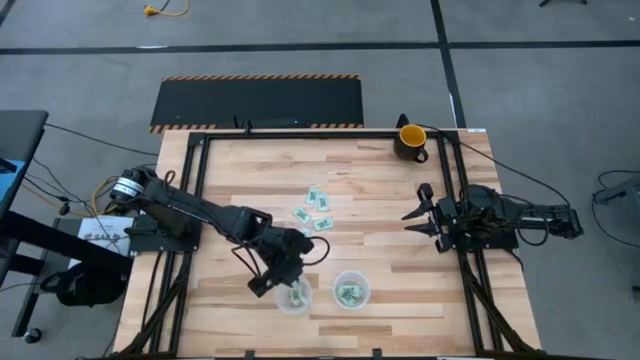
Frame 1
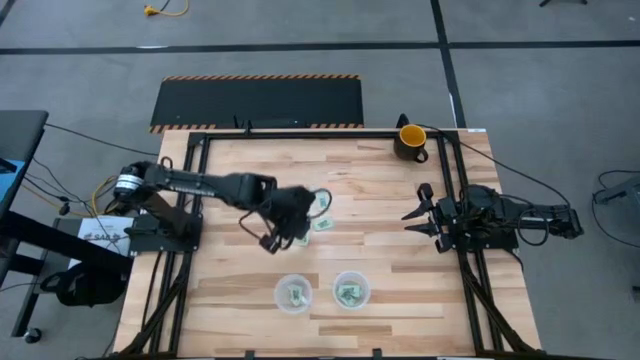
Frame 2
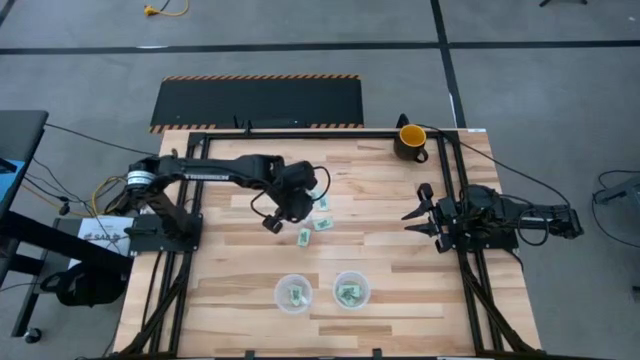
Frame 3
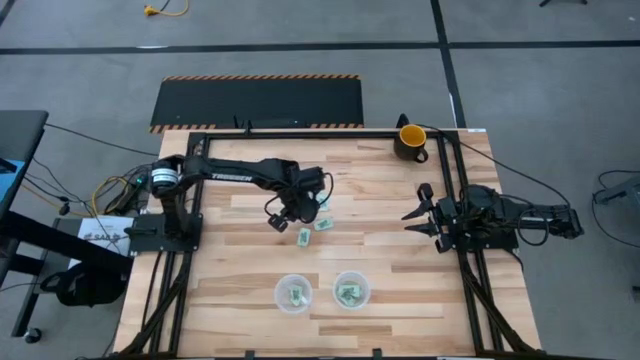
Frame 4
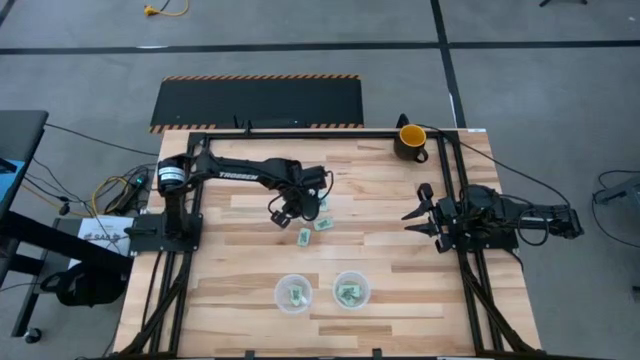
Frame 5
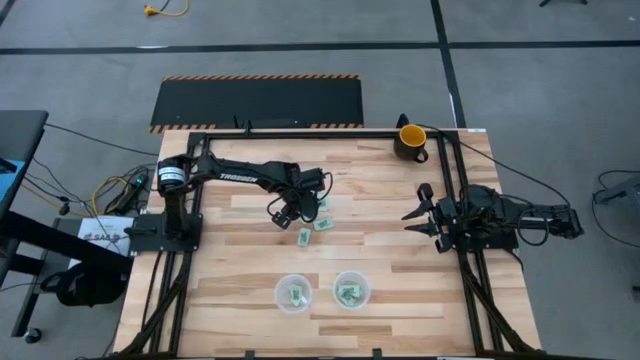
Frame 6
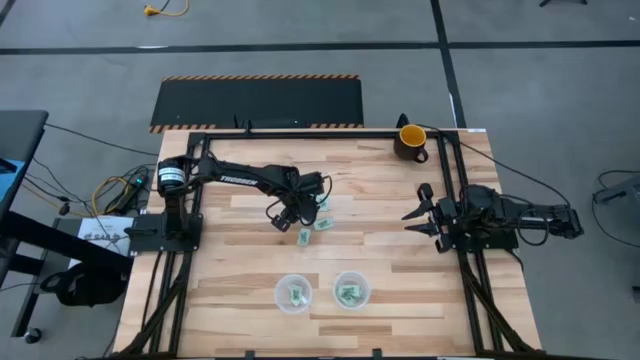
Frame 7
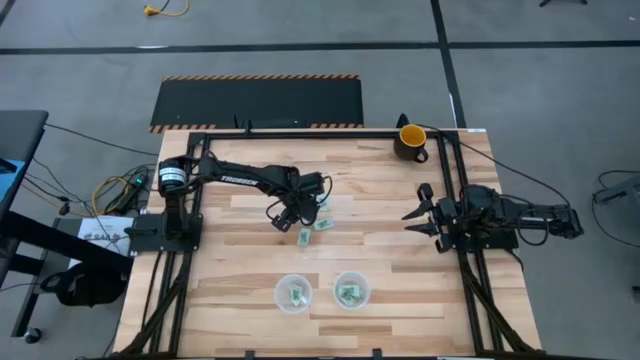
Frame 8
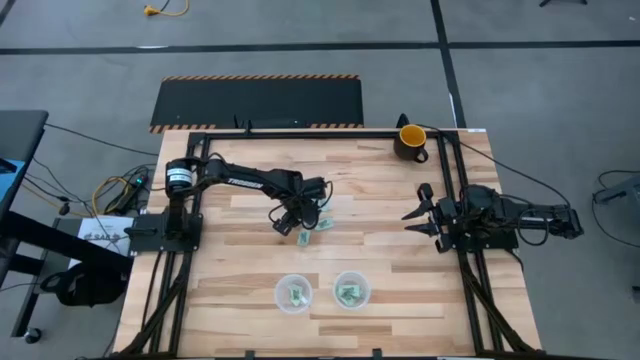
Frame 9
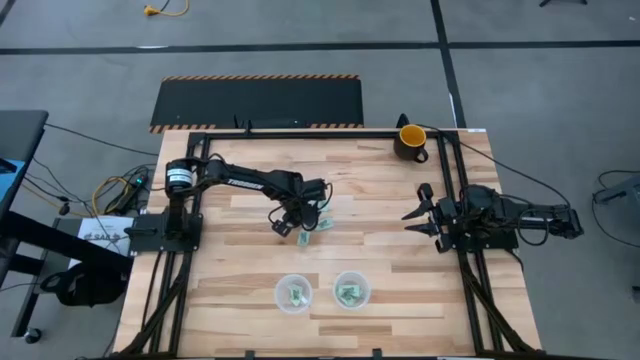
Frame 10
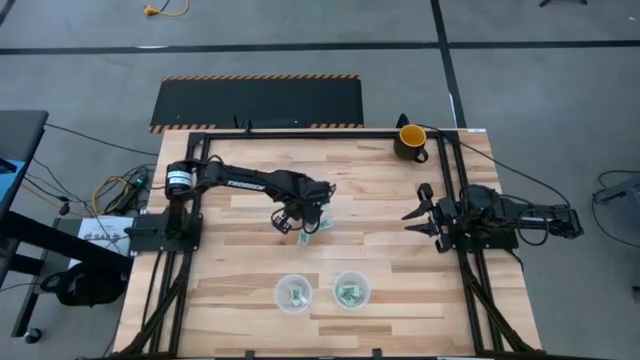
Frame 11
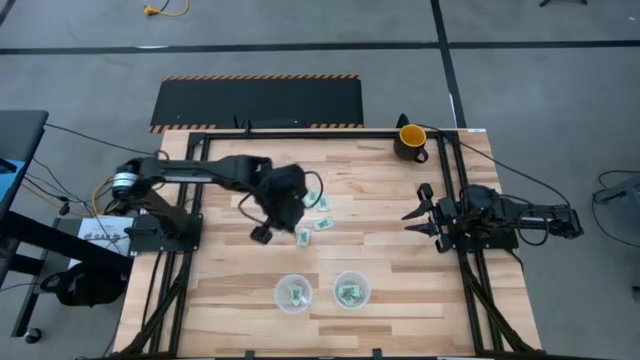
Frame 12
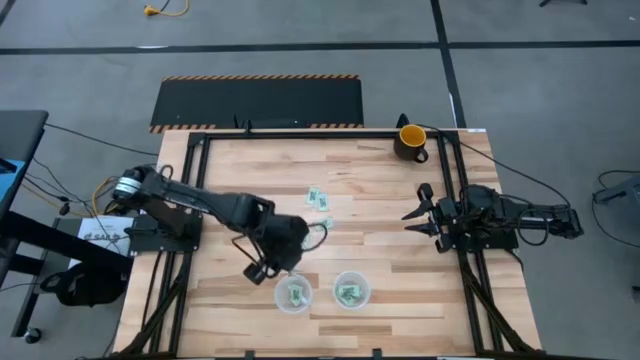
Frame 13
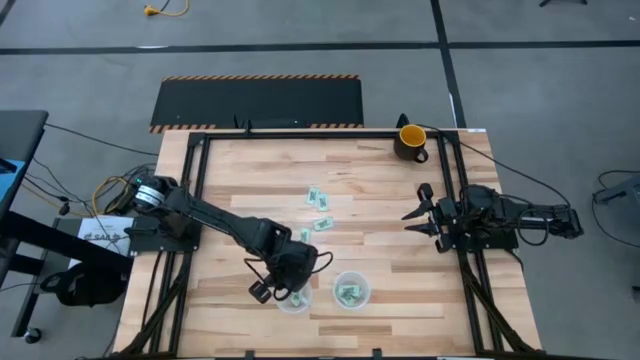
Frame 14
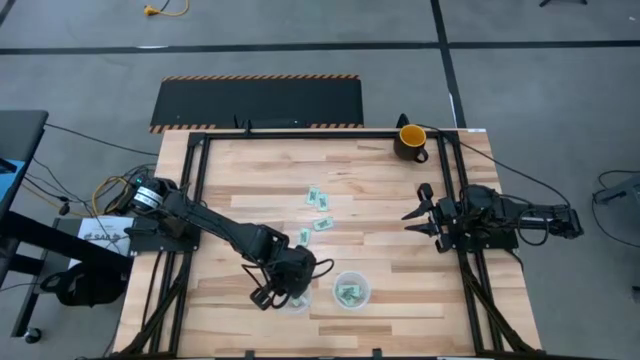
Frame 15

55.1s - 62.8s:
Task: Pick and place Stevia / Truvia into bins
Put the white stevia pack into the left transparent basket

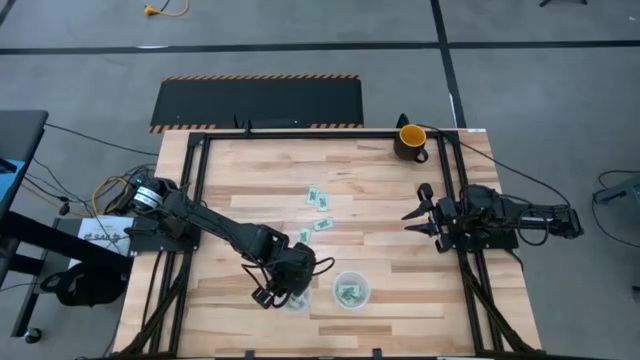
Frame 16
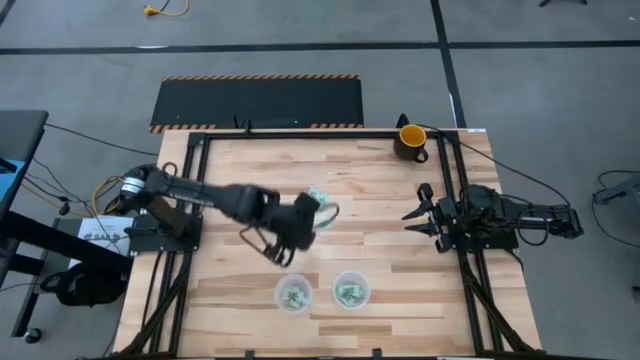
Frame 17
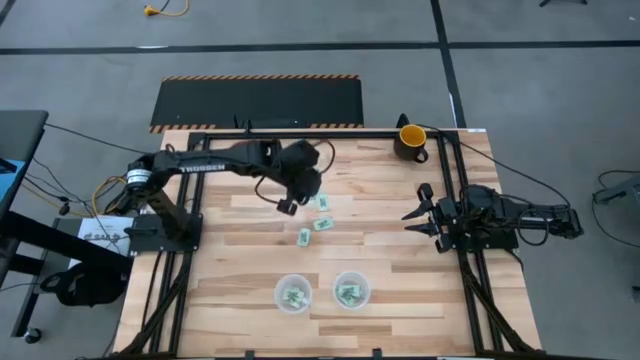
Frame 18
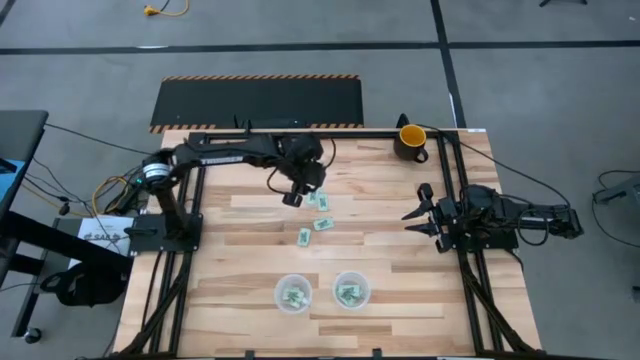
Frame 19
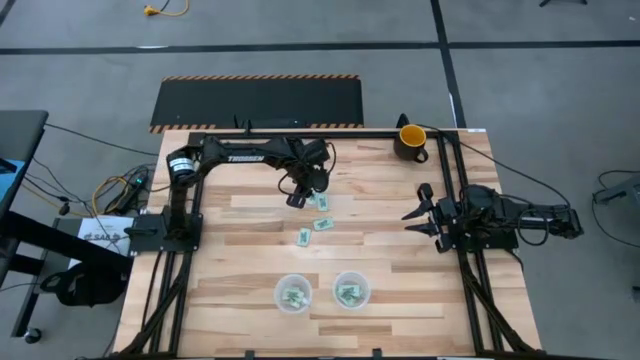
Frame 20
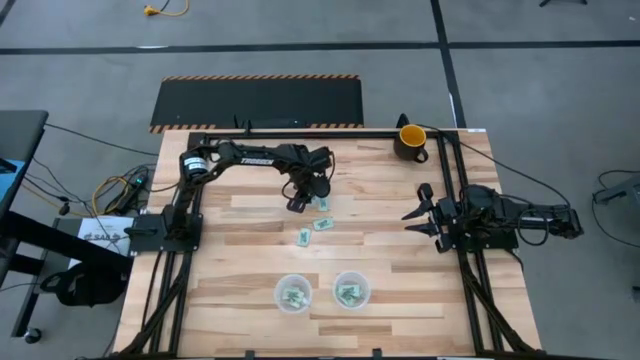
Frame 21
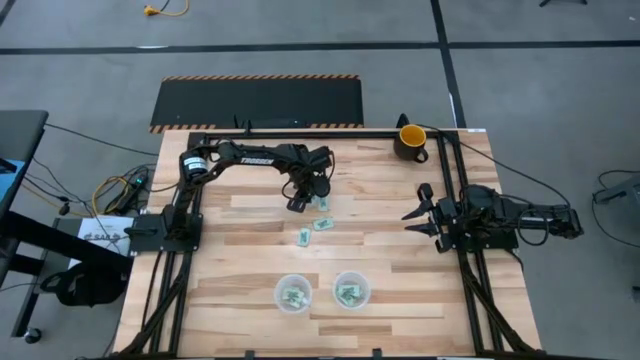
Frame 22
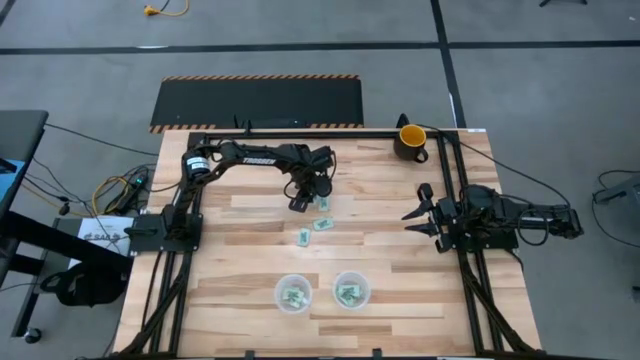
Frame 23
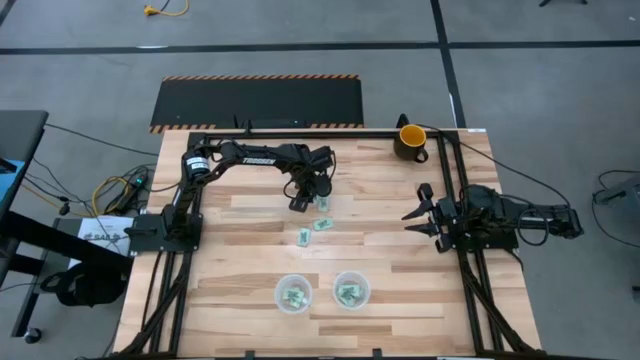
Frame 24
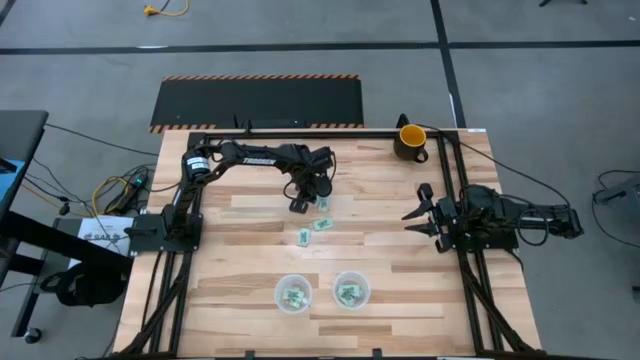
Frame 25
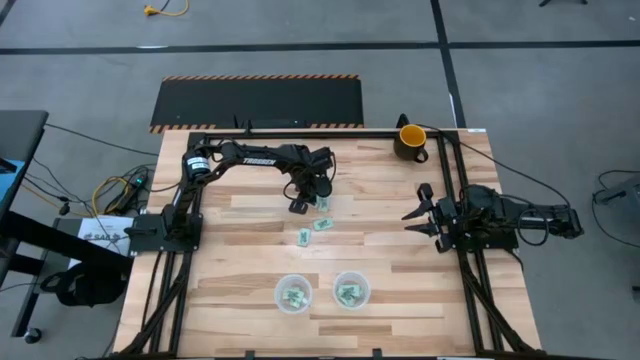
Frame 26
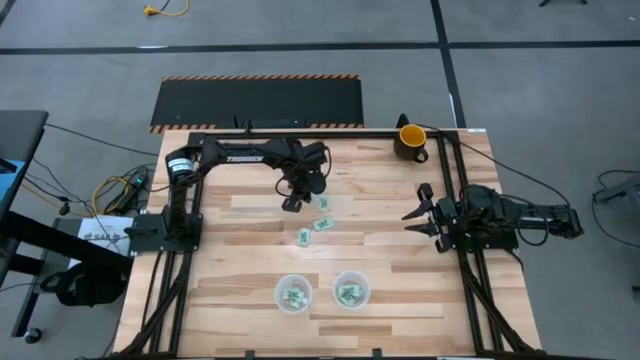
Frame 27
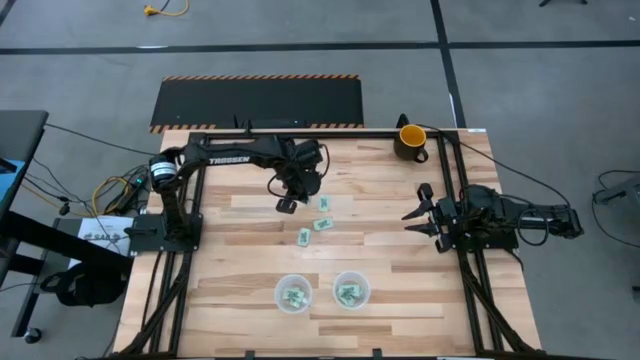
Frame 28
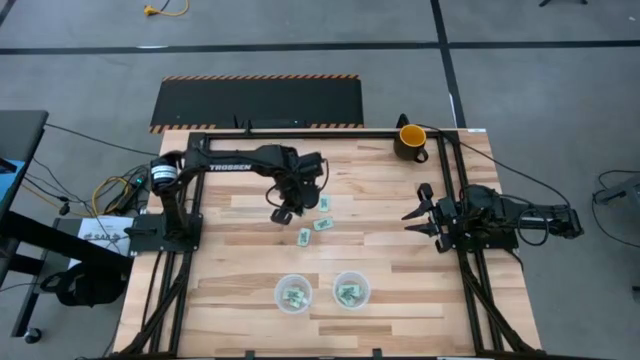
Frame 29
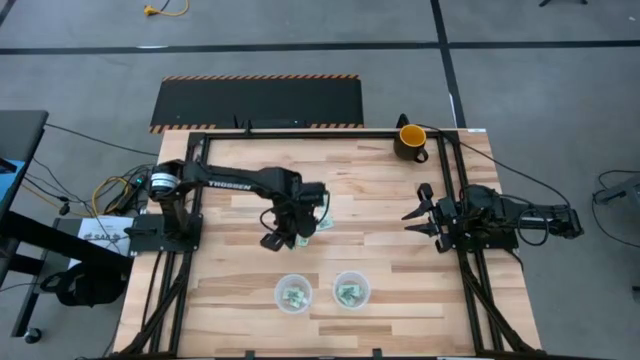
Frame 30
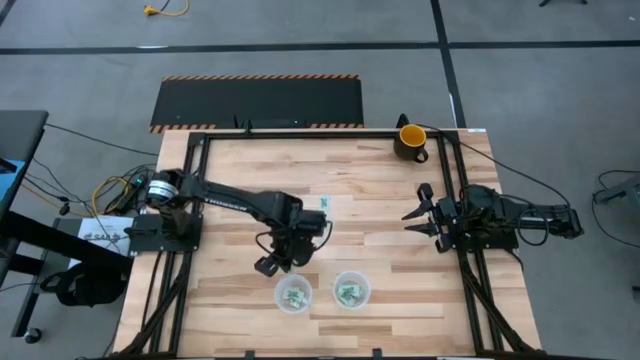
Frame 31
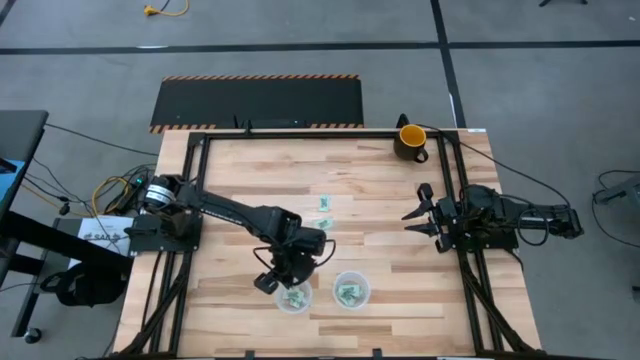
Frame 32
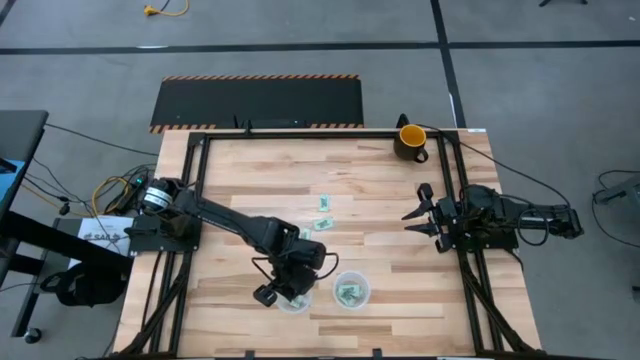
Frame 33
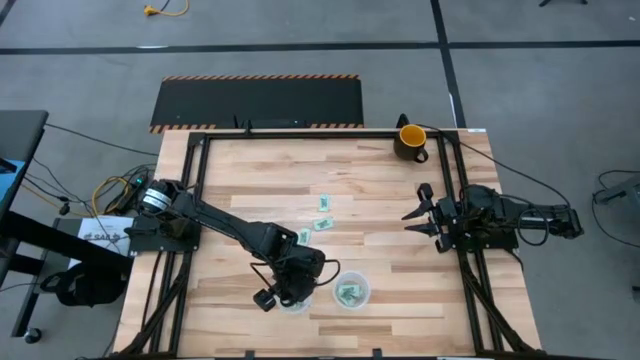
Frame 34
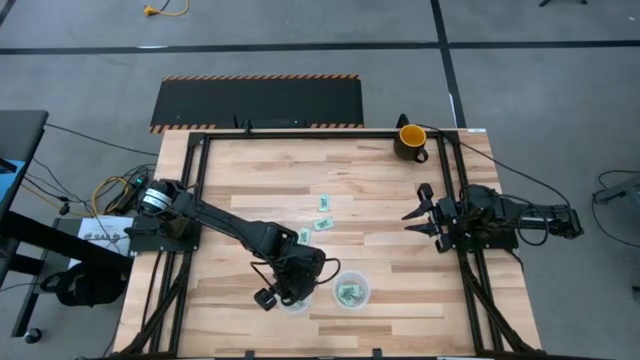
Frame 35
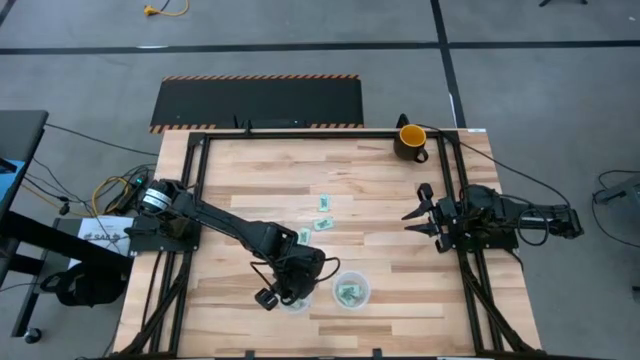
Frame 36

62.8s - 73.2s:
Put the white stevia pack into the left transparent basket

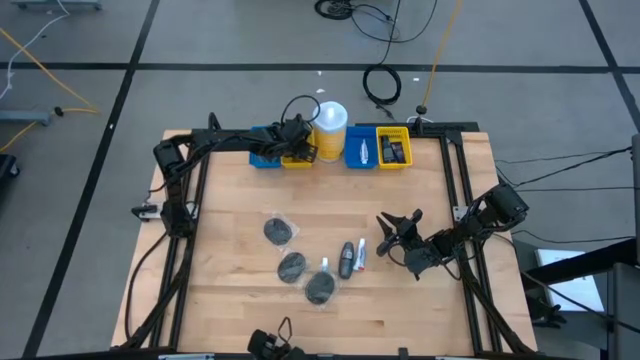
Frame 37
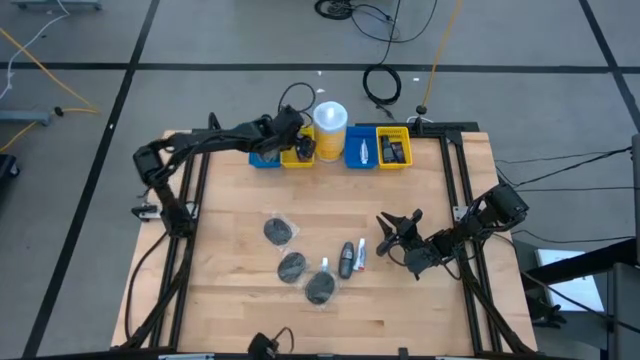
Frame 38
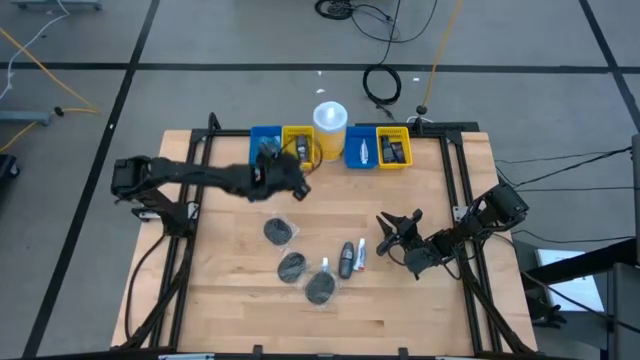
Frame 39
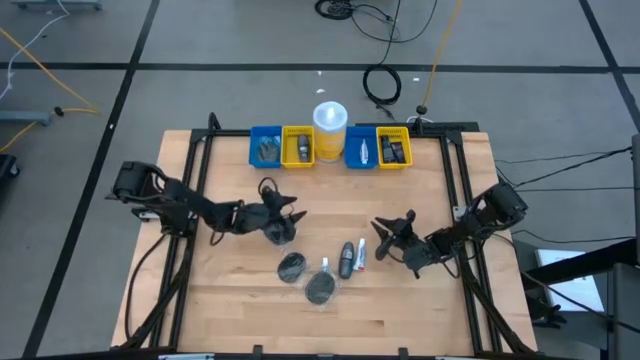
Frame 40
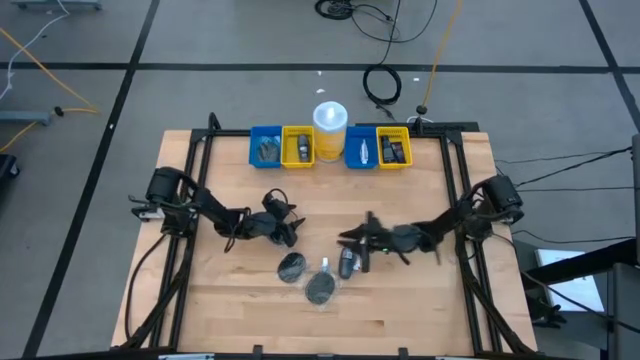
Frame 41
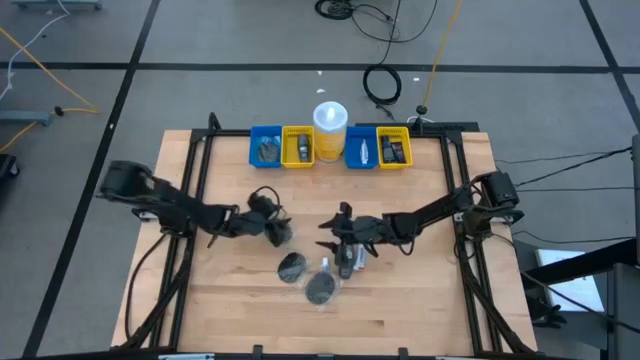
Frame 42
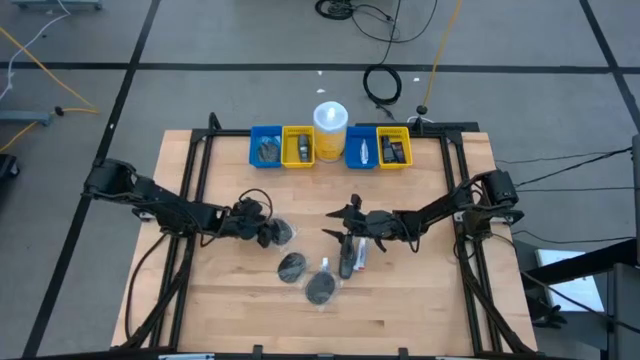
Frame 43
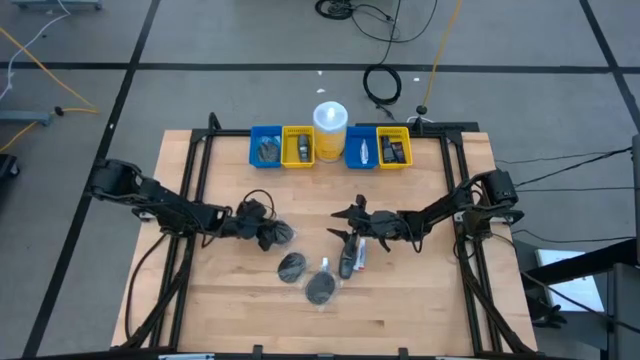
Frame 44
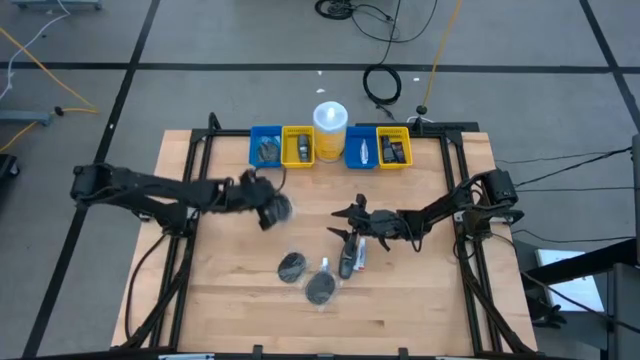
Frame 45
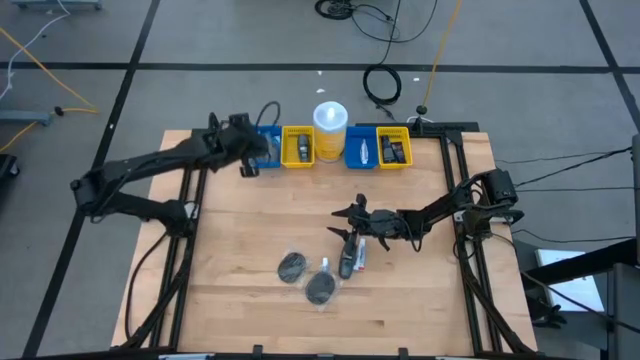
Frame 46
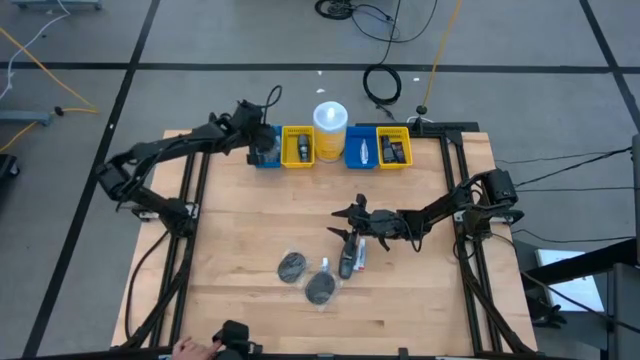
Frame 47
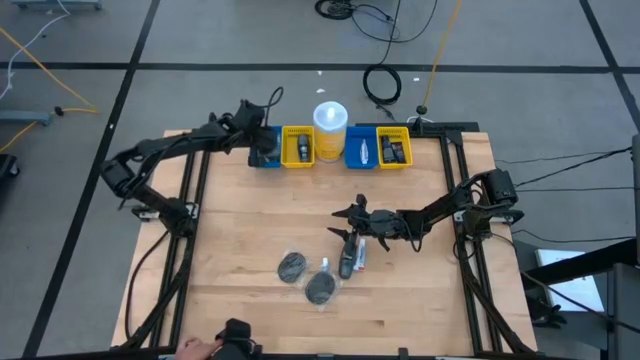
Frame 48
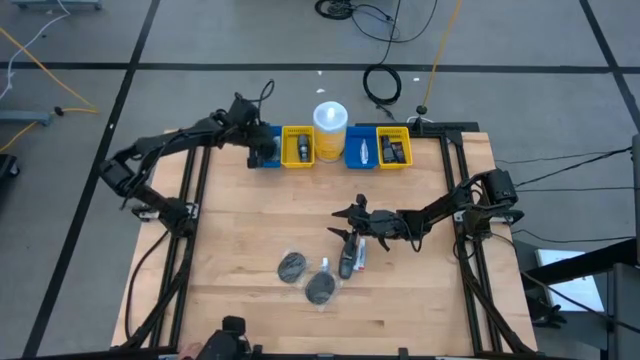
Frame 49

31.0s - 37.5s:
Task: Pick & Place Travel size toiletries
Put the black hairbrush into the left blue bin
